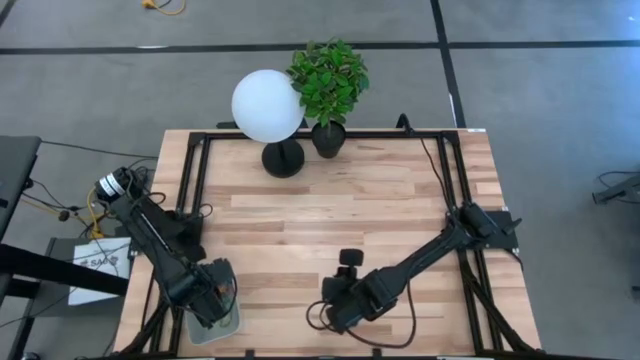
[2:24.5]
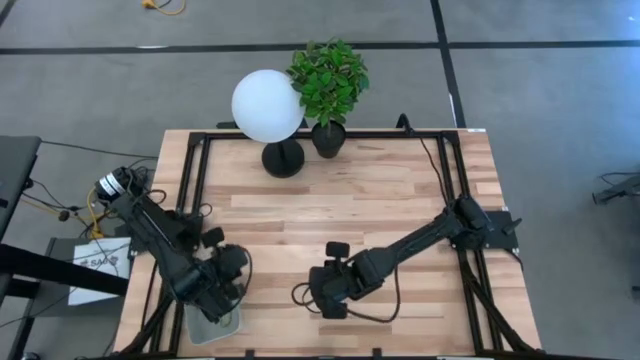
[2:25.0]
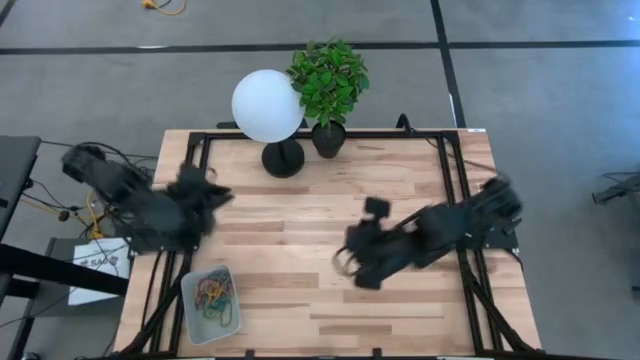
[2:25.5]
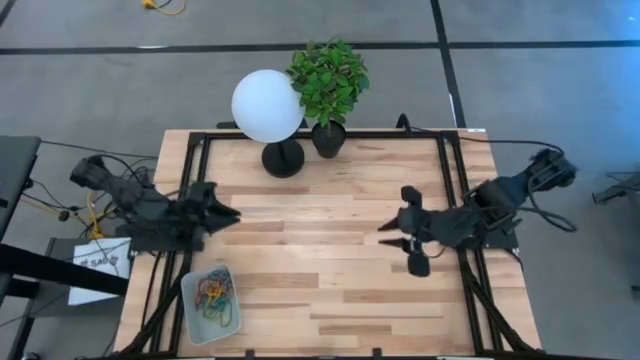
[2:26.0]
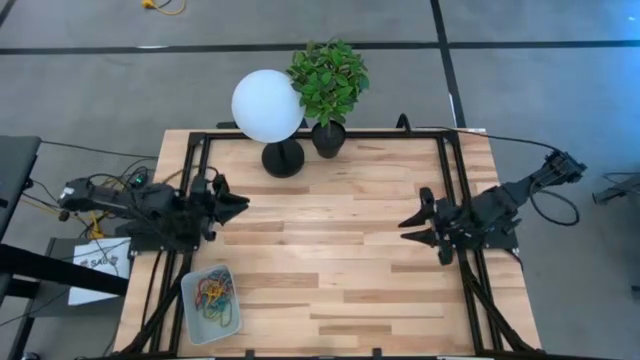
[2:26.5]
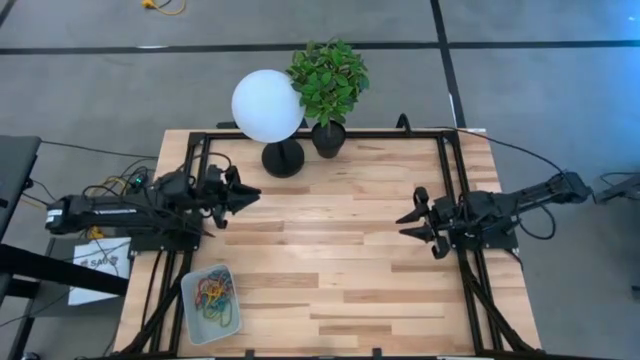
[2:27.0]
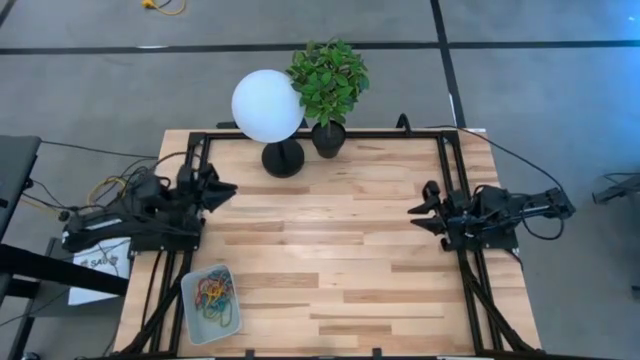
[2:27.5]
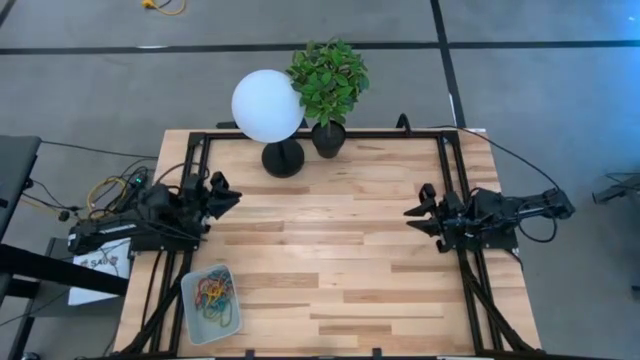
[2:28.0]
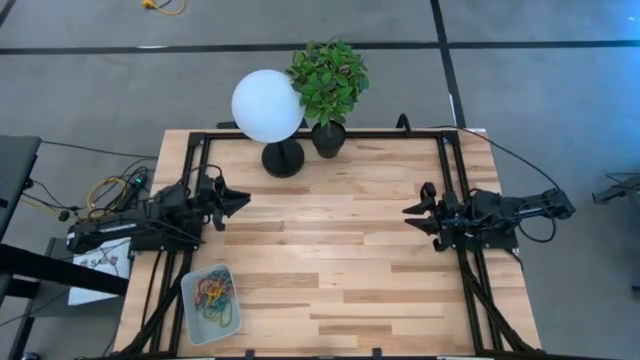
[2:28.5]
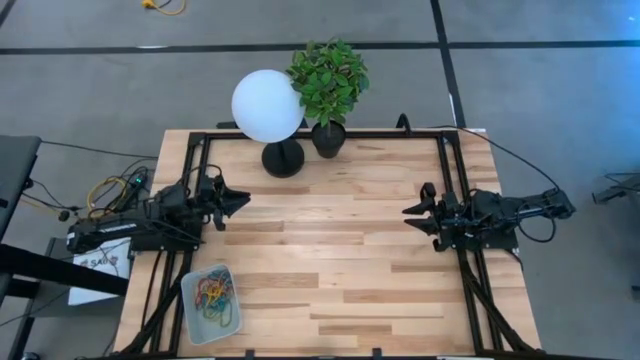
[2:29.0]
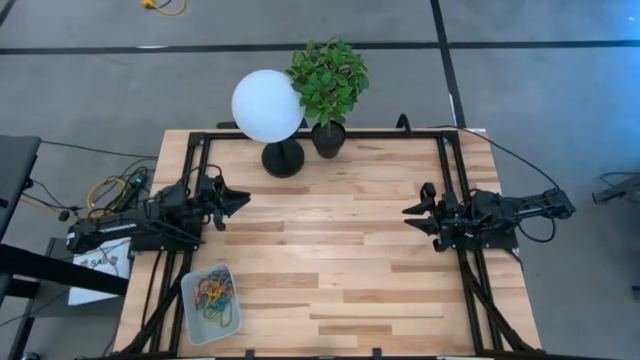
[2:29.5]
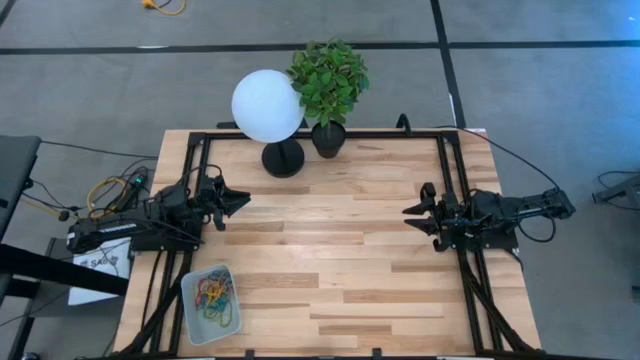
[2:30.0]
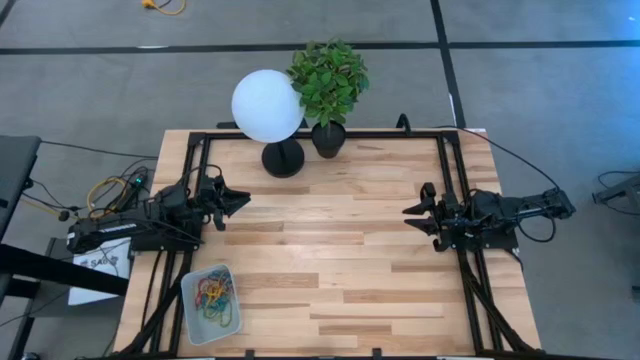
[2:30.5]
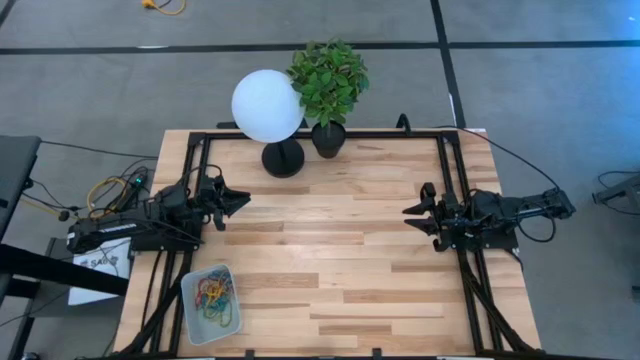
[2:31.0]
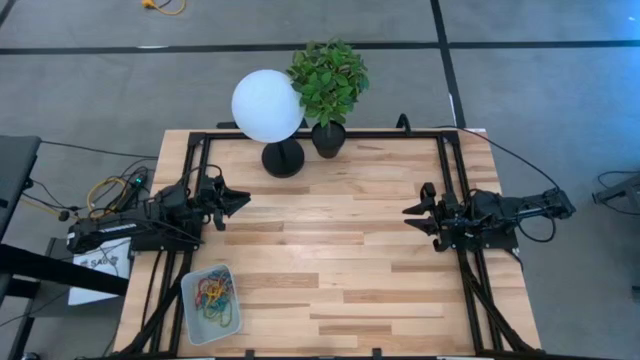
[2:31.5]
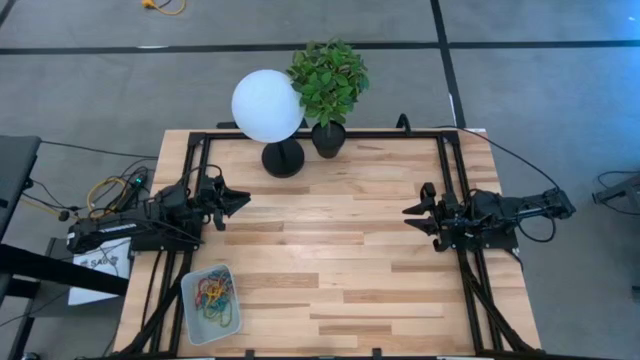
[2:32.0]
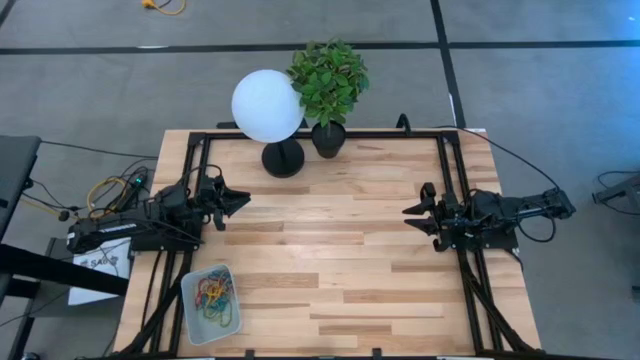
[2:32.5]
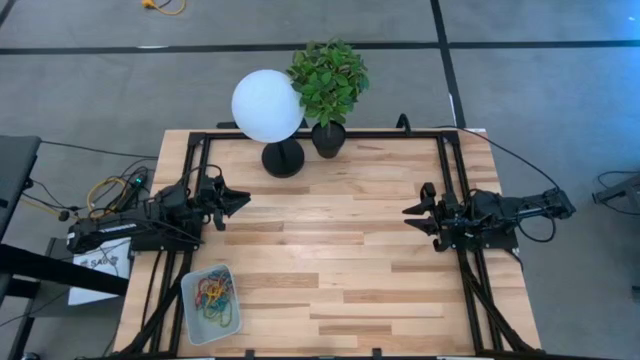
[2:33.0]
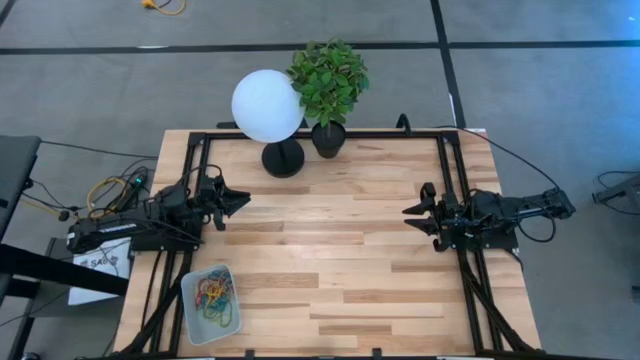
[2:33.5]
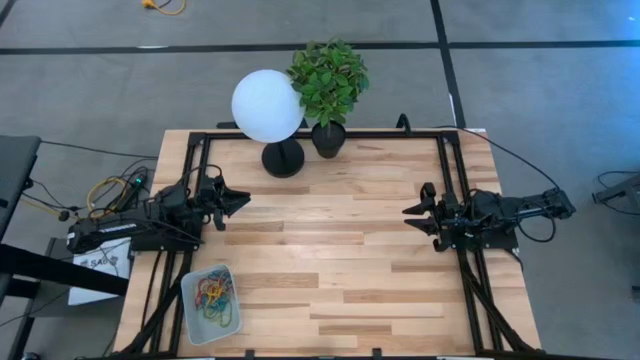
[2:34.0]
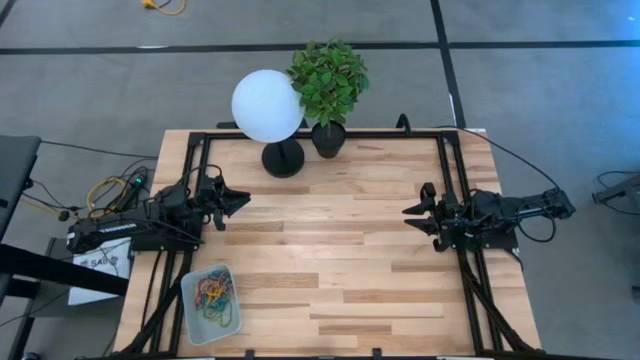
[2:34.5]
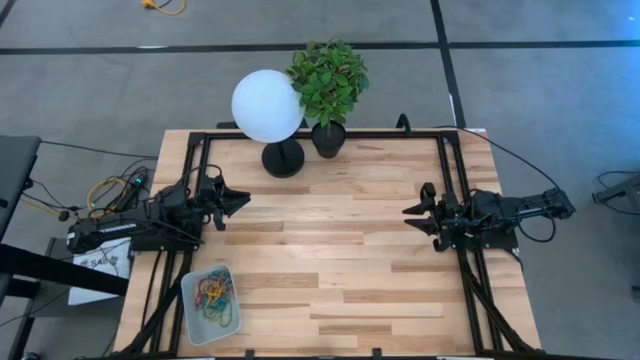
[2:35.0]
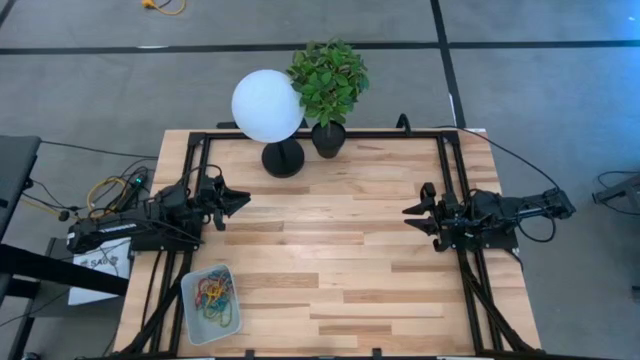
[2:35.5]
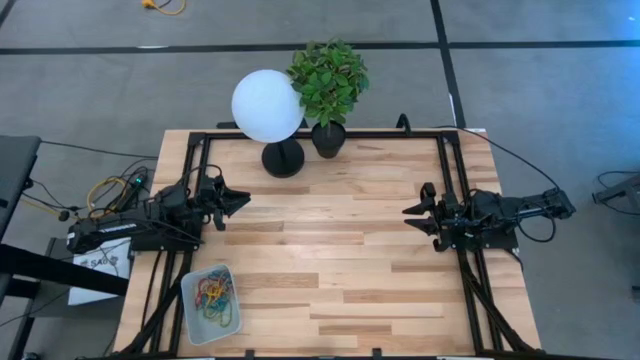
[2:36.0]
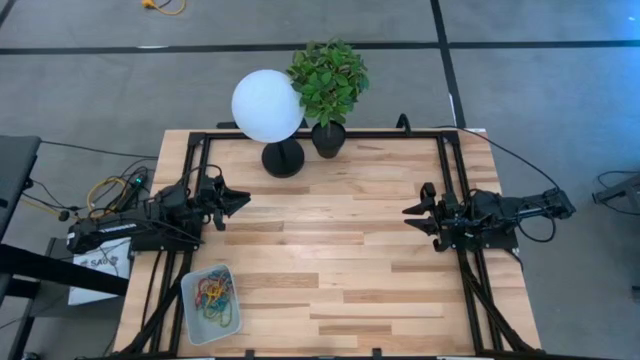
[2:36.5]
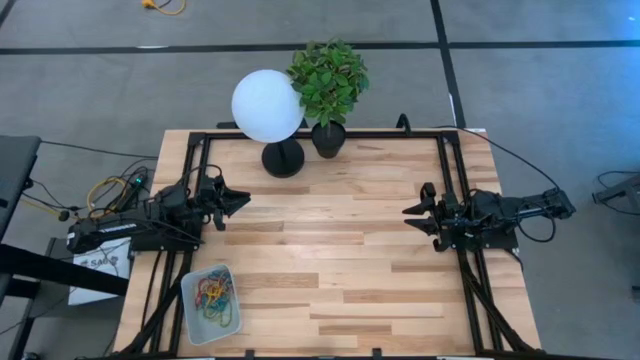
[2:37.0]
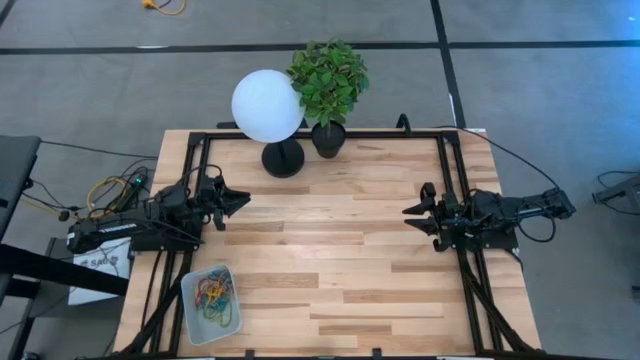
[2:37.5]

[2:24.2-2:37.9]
Task: Pick and place items into bin
Return to Home Position

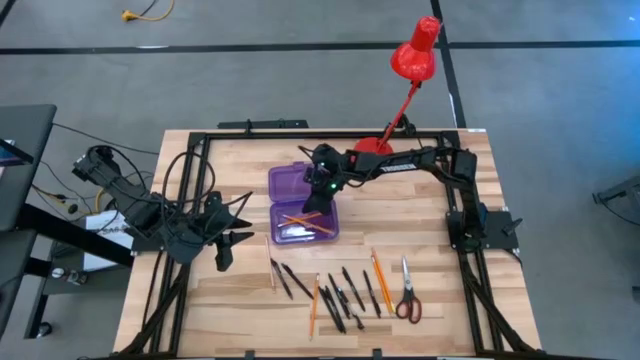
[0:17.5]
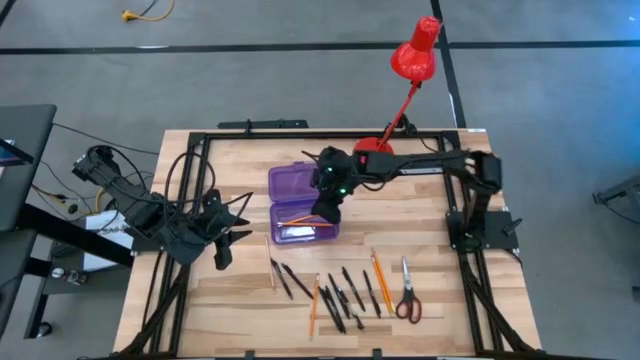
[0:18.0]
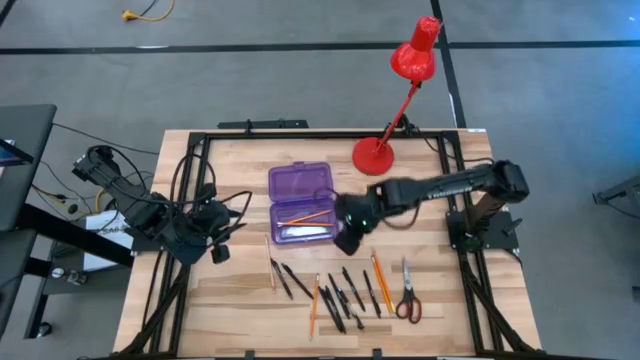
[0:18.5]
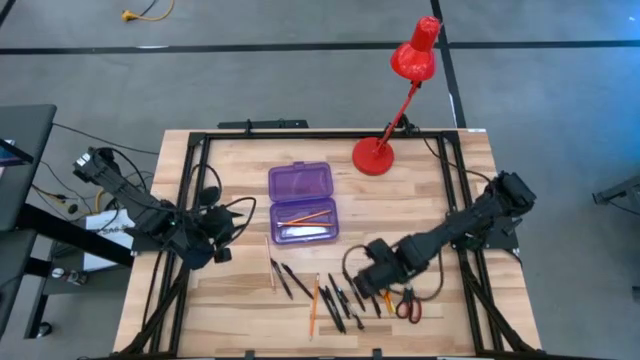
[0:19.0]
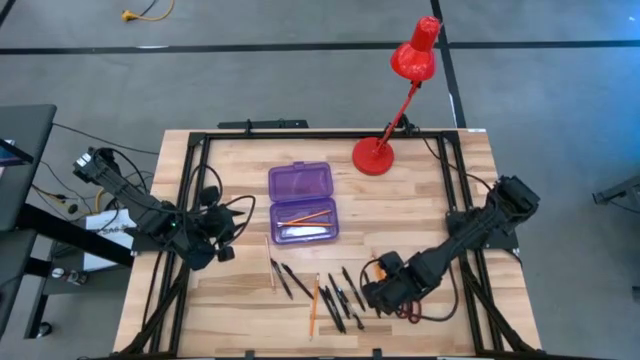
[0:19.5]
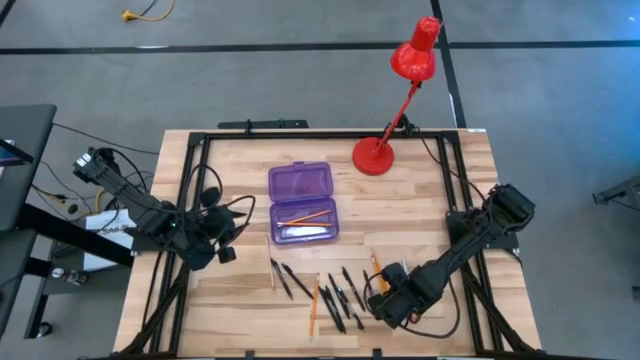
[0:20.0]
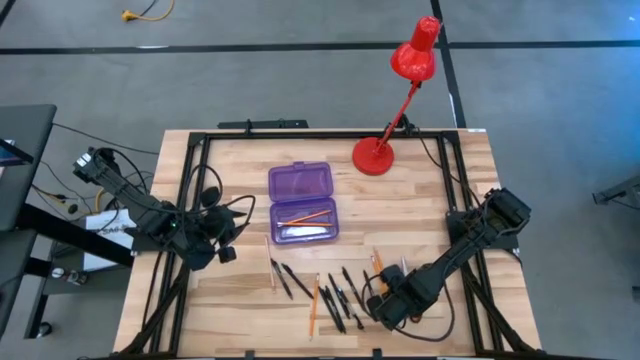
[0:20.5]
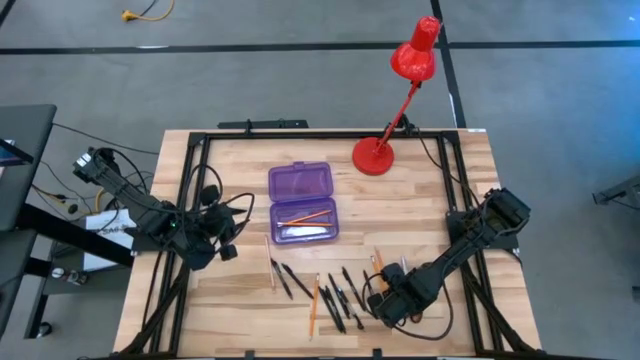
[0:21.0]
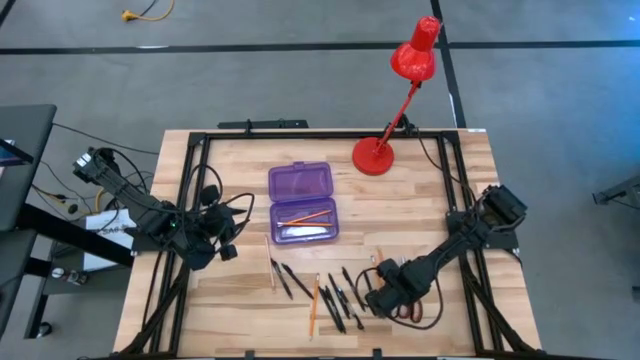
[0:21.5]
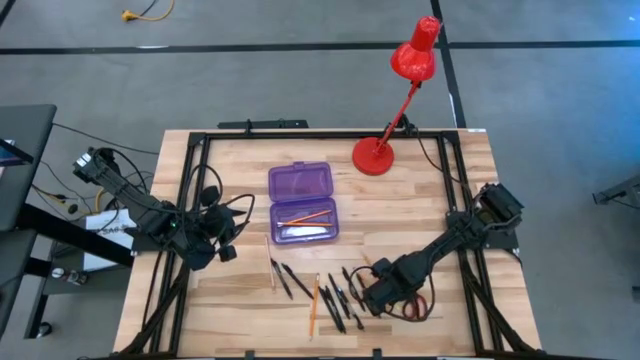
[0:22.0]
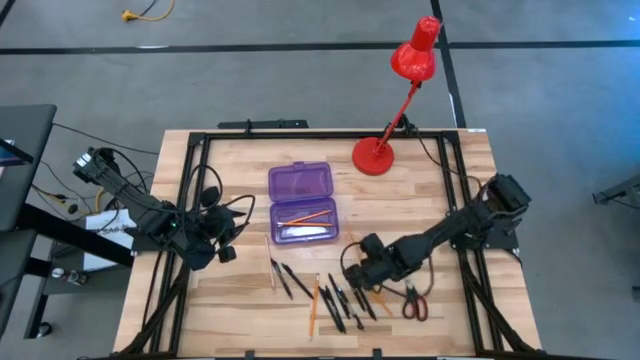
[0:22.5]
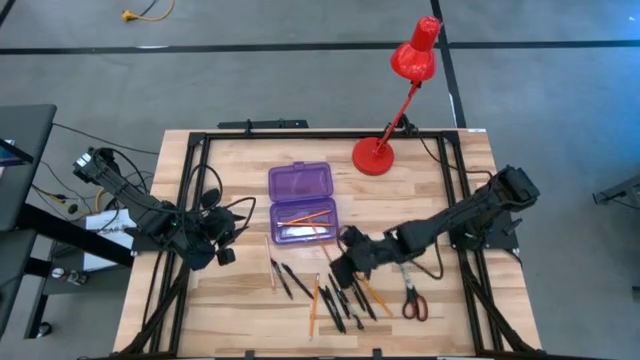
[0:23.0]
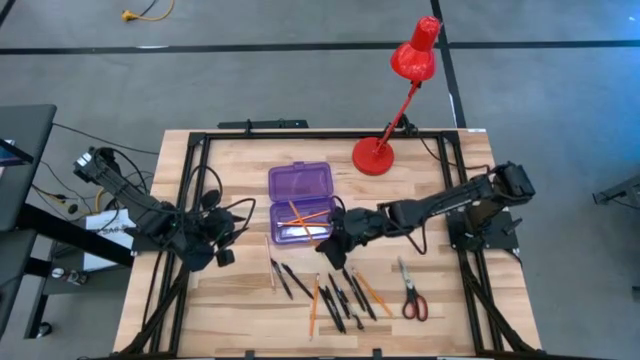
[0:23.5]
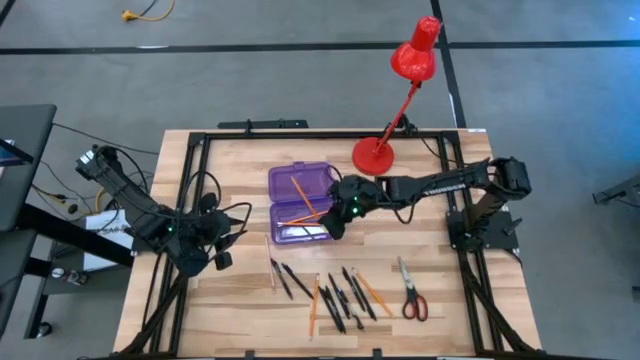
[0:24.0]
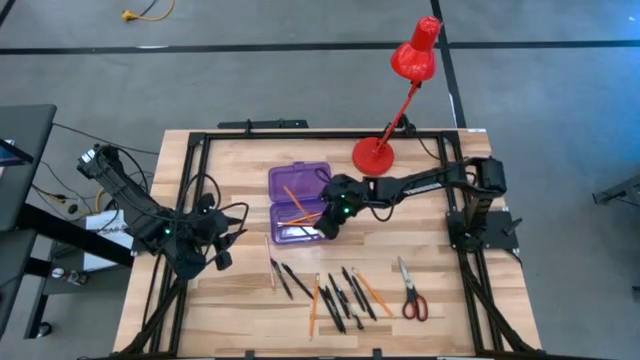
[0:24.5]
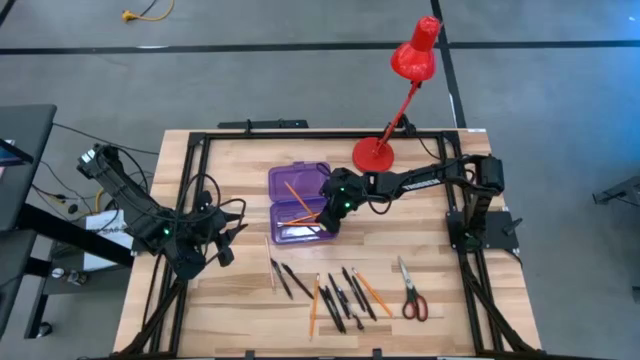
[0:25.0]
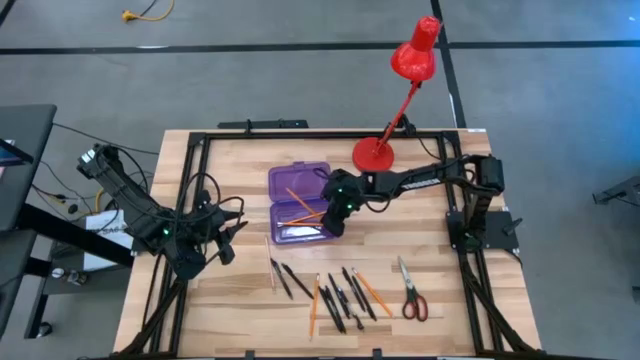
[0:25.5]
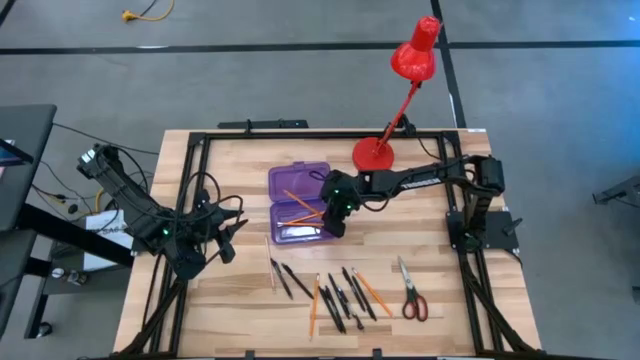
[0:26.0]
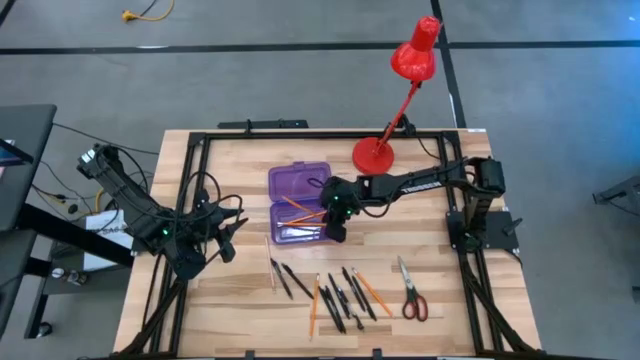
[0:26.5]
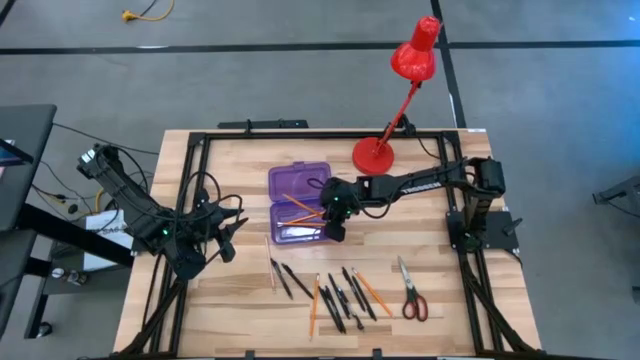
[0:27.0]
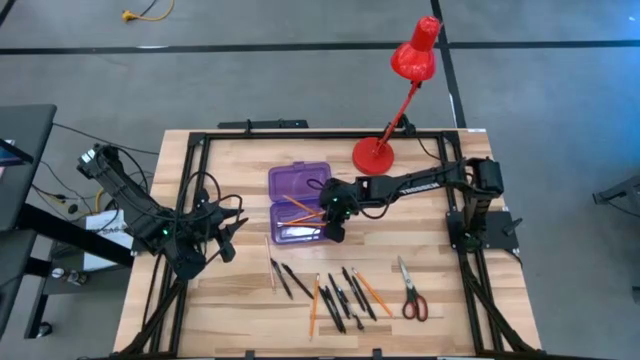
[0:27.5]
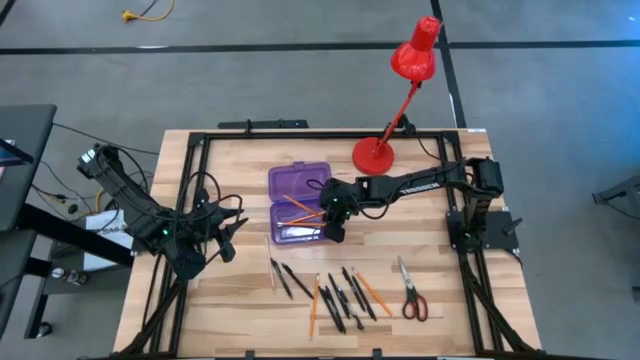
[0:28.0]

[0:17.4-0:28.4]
Task: Pick & place school supplies into a supply box
Put the orange pencil into the purple supply box
